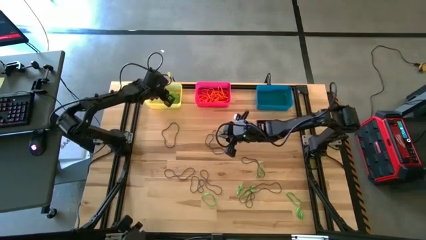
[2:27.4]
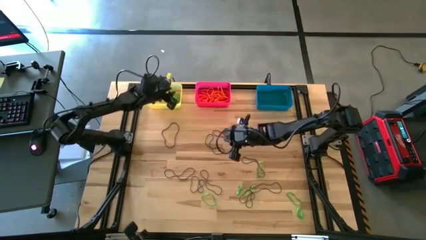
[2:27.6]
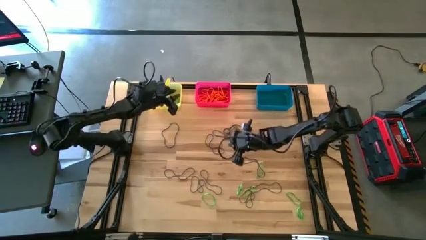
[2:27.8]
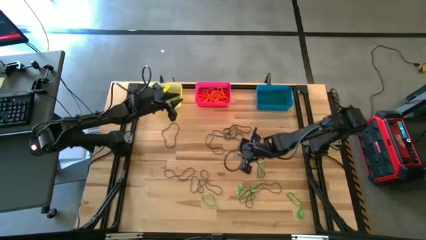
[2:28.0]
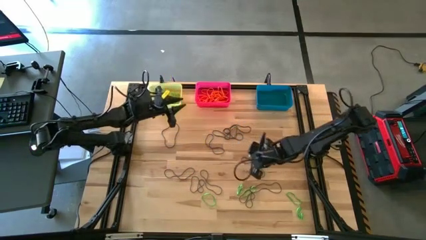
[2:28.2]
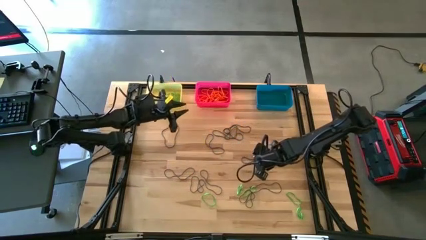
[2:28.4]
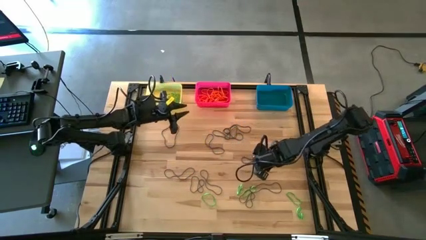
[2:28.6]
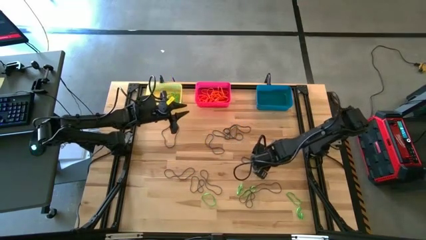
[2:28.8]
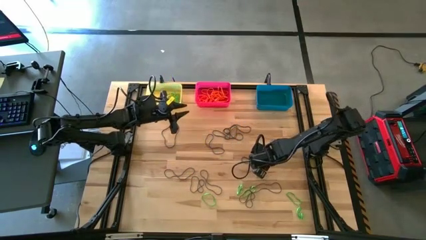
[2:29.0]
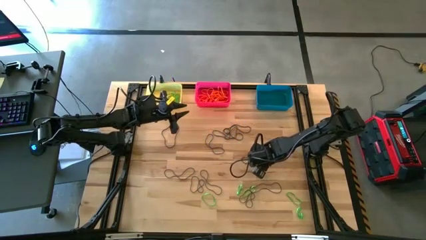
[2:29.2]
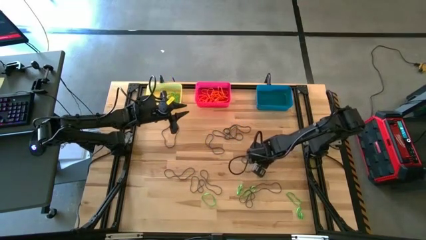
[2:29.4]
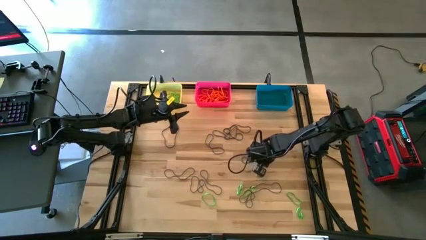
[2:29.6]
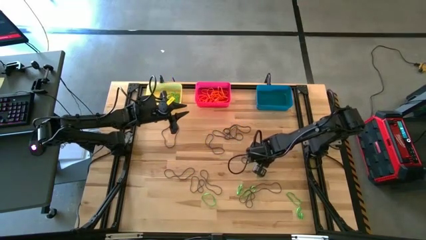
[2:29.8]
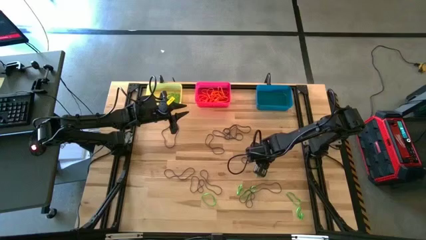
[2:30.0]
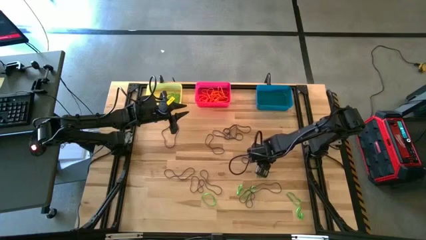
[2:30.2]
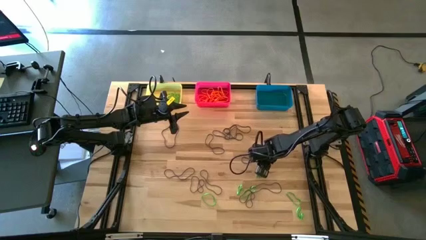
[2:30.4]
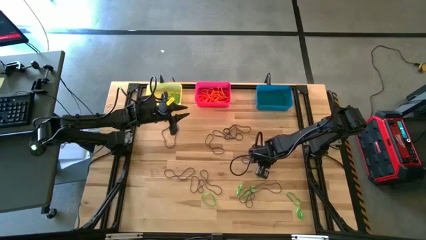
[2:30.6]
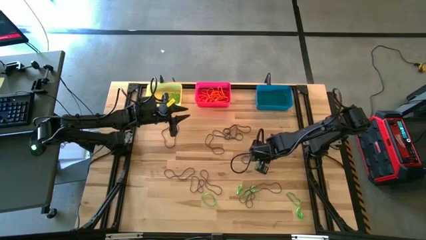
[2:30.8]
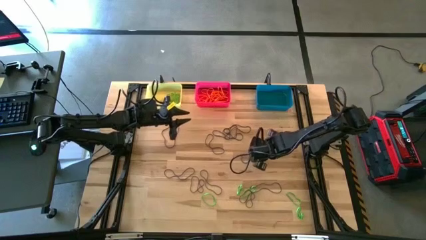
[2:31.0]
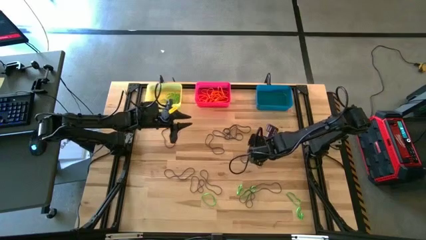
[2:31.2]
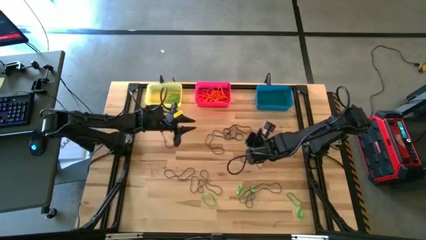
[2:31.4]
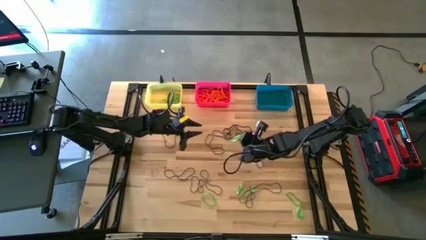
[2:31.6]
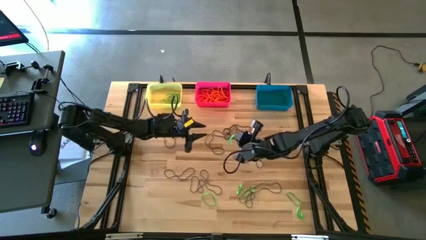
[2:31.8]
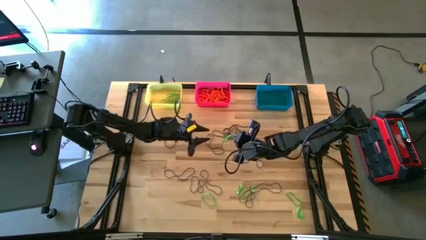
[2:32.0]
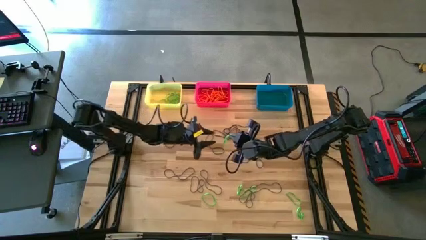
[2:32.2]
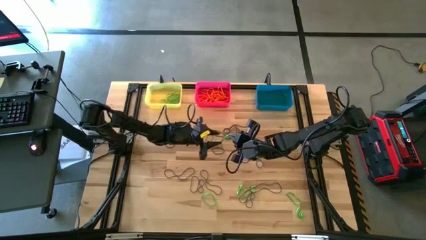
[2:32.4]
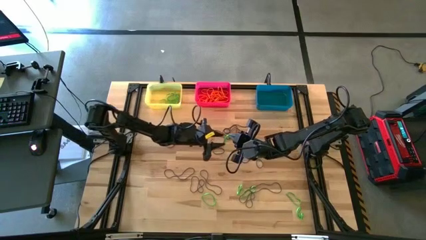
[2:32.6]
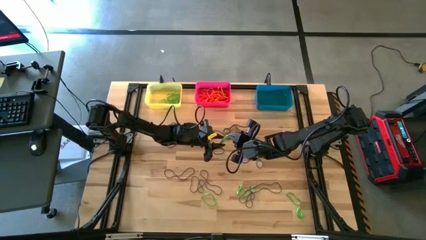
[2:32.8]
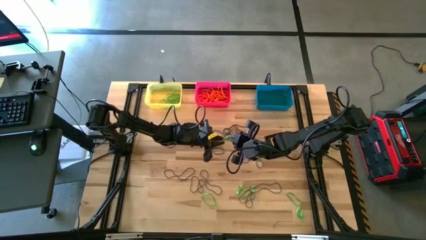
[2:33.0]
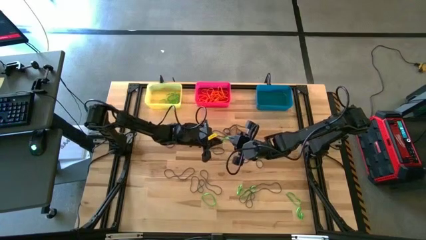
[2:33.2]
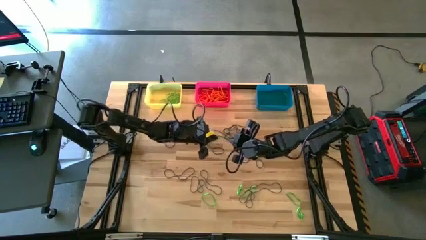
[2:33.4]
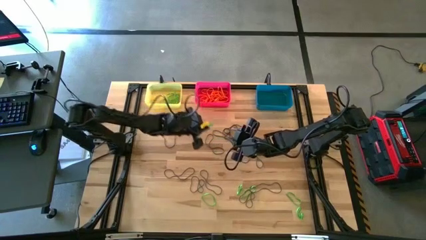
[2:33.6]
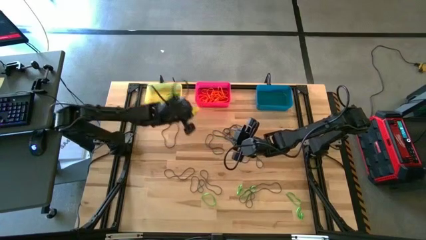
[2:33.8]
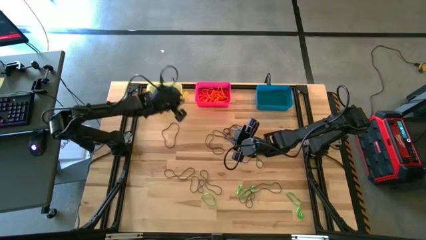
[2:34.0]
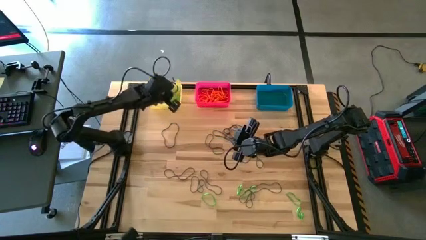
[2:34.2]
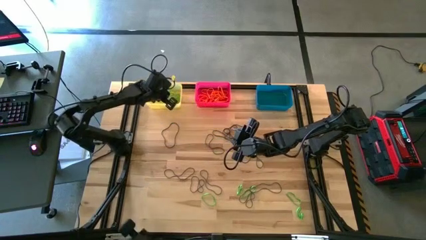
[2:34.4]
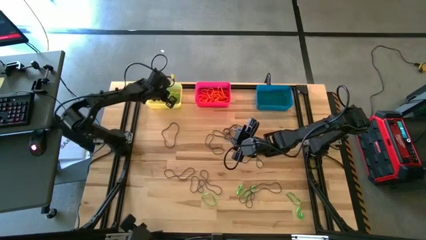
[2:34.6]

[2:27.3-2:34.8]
Task: Sort rubber bands into baskets
Put the green rubber band into the yellow bin

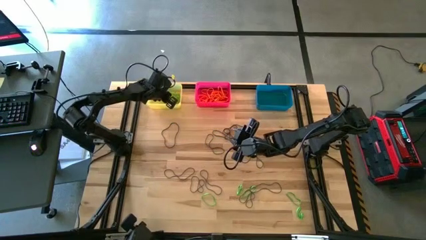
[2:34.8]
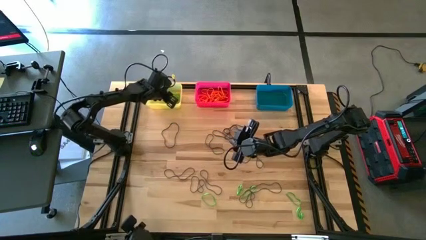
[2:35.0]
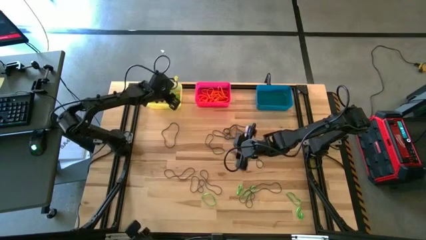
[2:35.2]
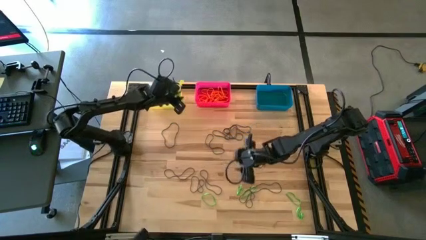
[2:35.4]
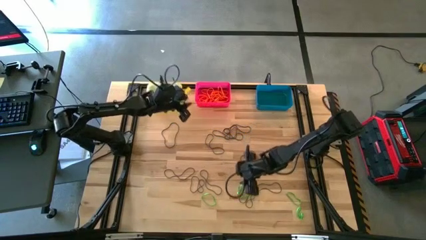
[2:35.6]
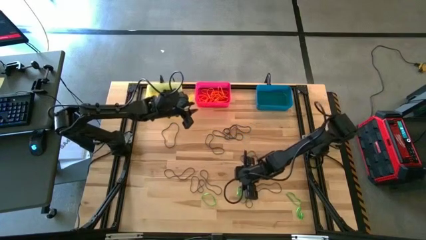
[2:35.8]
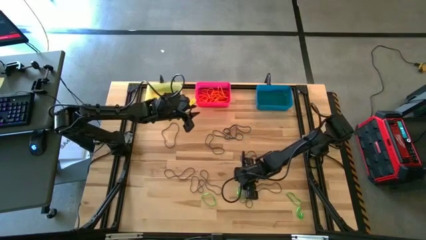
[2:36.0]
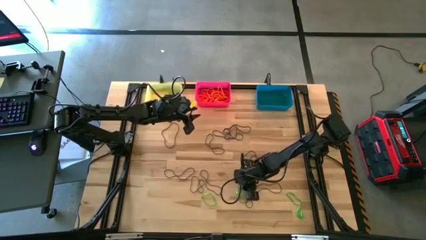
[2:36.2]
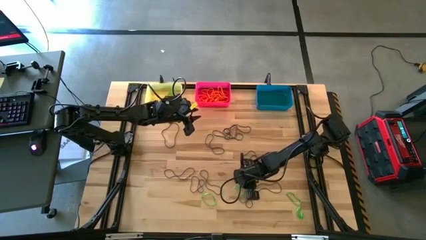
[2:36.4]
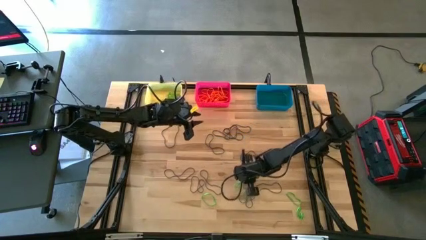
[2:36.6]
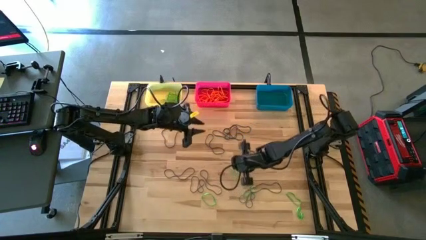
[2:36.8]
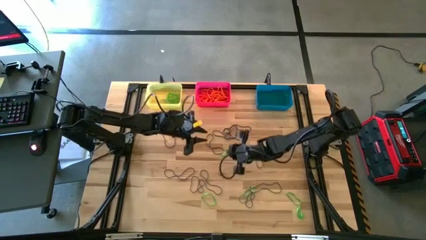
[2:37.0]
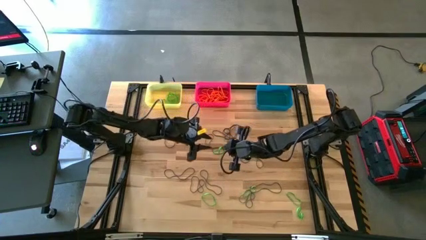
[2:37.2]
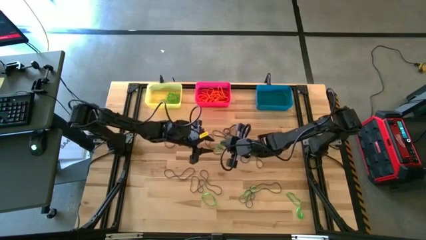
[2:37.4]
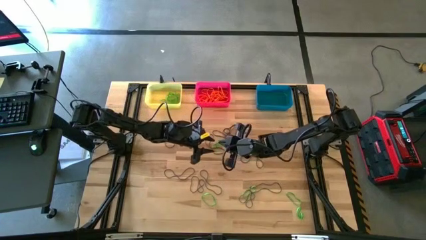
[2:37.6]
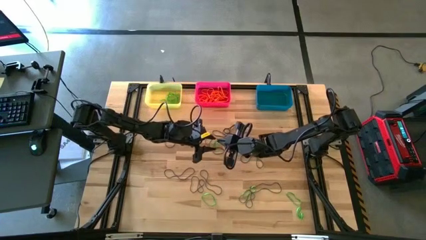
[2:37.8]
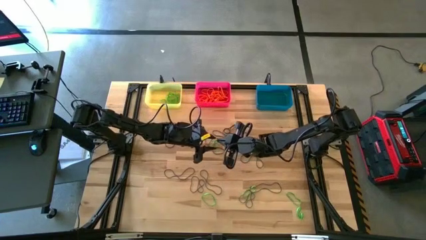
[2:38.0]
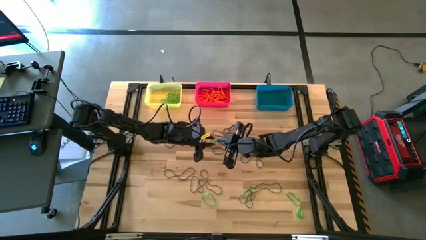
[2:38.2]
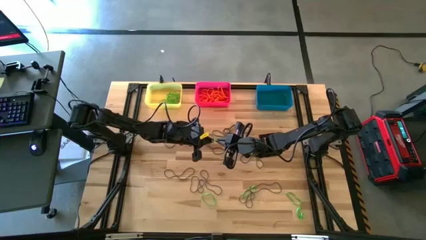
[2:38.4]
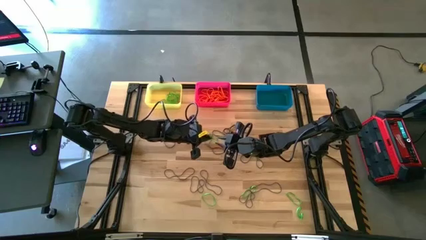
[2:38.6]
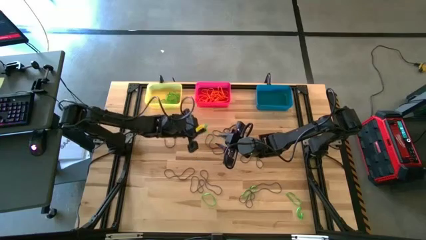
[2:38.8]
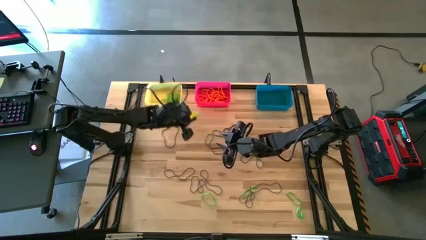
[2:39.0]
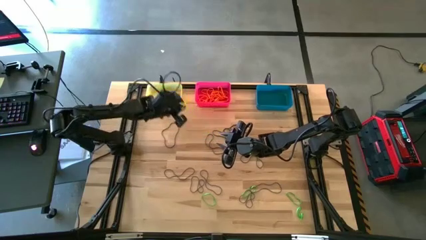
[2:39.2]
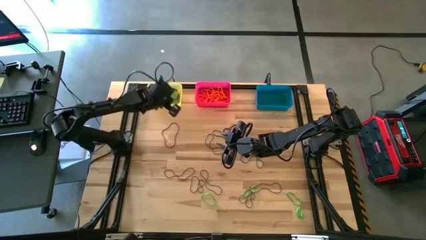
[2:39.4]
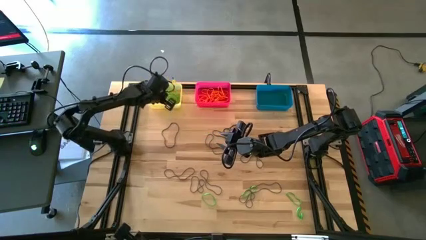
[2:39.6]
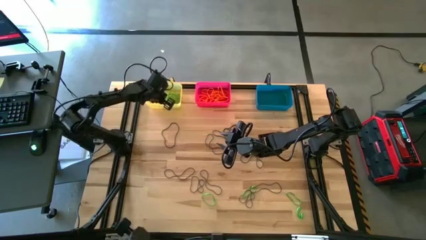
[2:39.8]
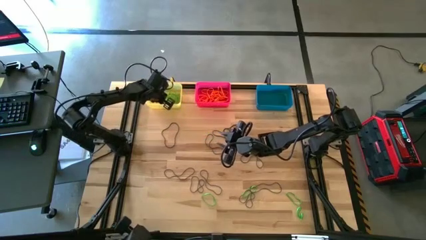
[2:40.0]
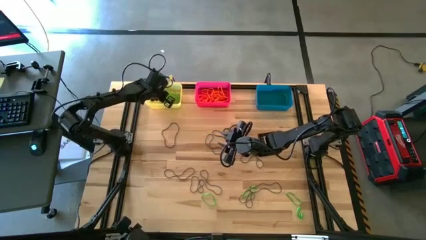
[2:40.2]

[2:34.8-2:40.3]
Put the green rubber band into the yellow bin

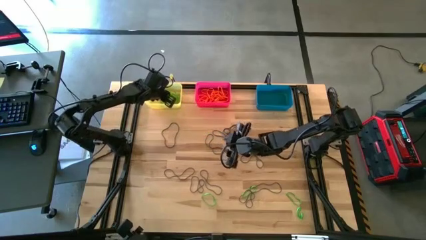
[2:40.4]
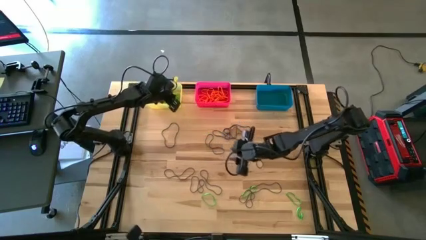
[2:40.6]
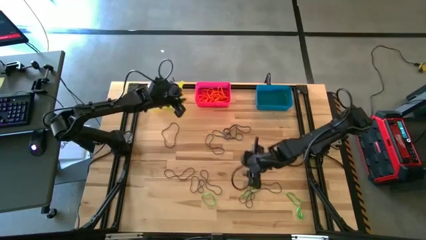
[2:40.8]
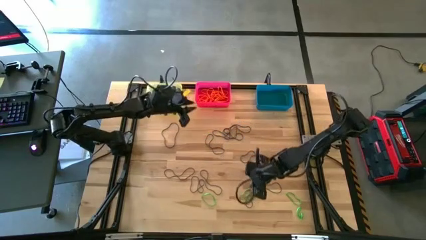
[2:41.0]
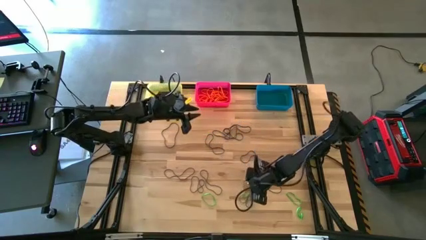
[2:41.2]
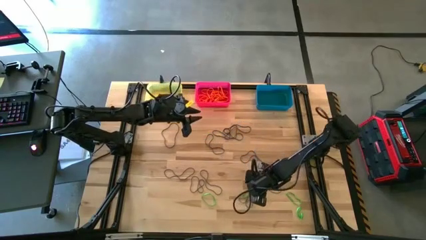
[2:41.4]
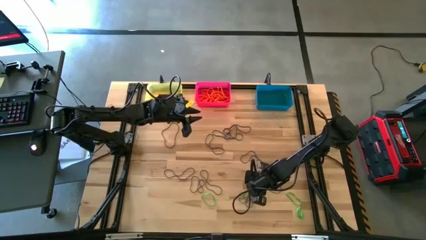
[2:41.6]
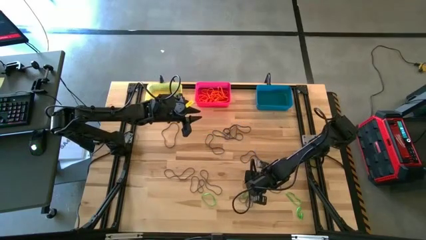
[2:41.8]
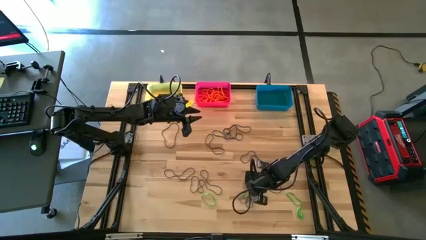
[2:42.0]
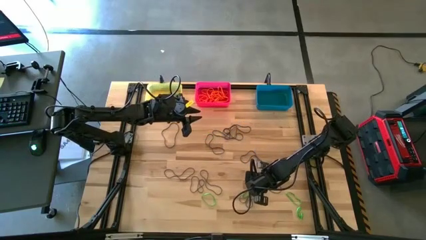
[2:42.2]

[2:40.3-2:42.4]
Put the green rubber band into the yellow bin
